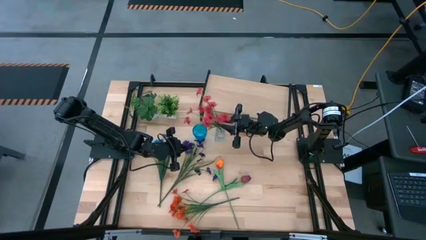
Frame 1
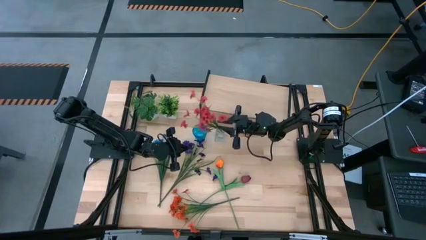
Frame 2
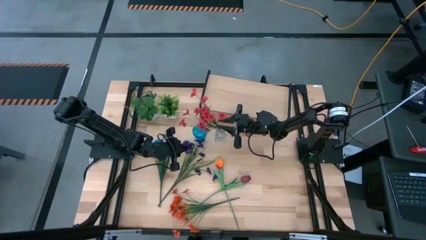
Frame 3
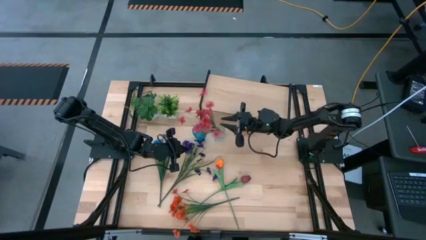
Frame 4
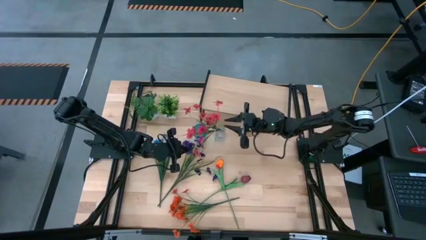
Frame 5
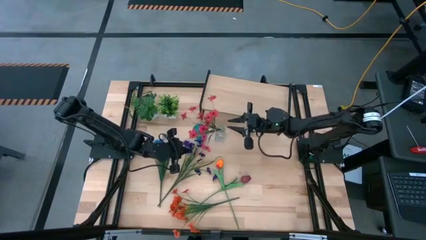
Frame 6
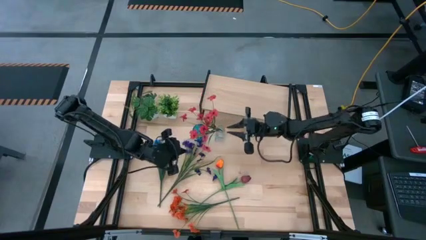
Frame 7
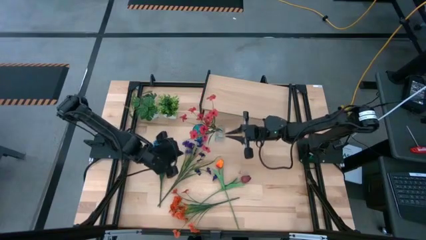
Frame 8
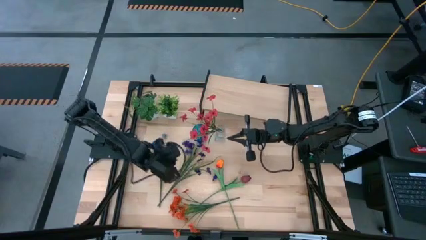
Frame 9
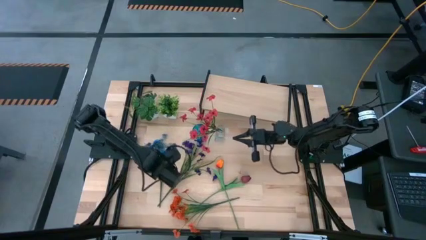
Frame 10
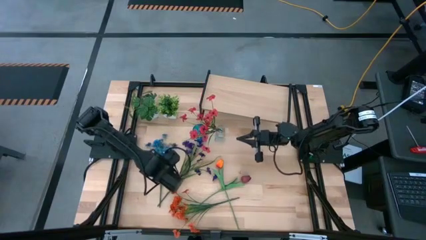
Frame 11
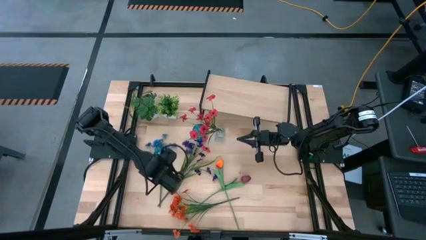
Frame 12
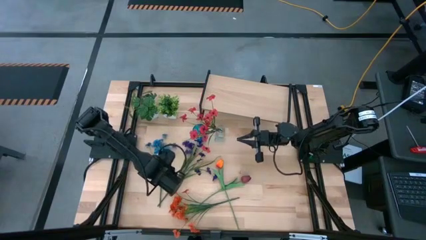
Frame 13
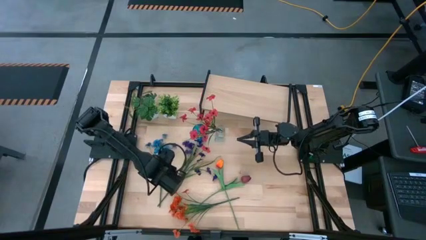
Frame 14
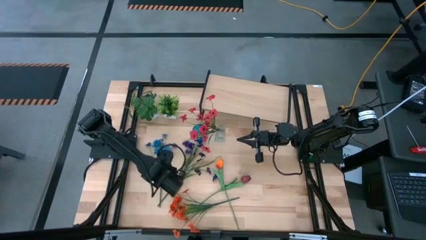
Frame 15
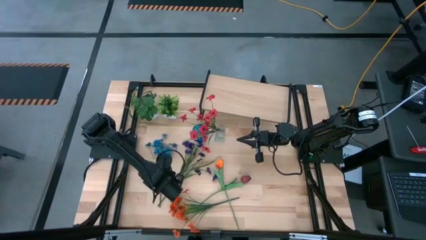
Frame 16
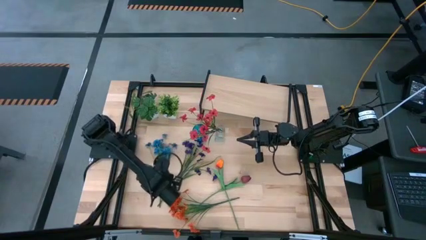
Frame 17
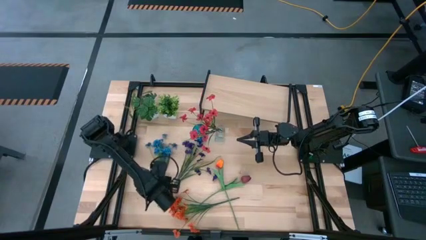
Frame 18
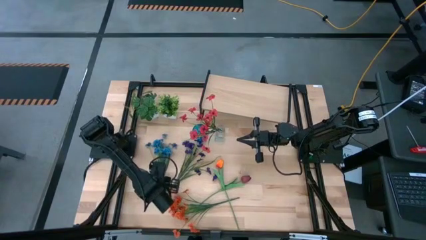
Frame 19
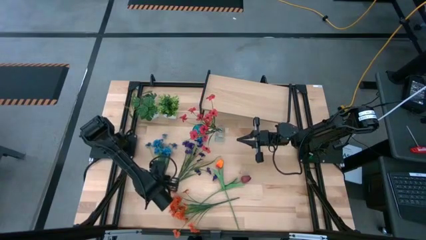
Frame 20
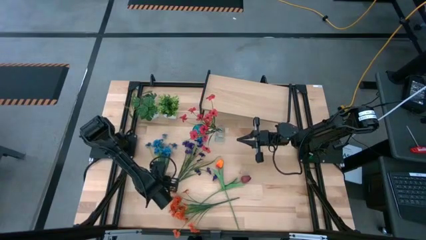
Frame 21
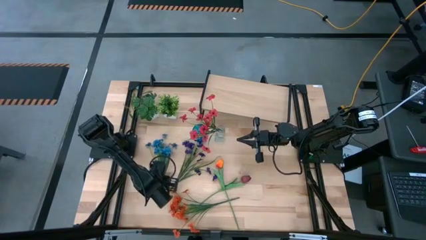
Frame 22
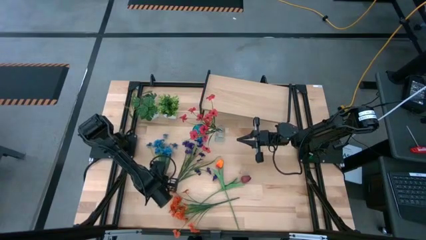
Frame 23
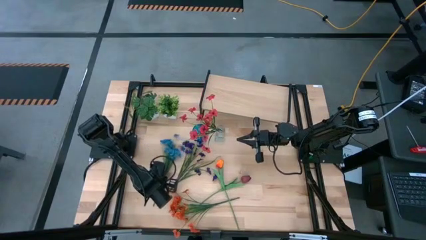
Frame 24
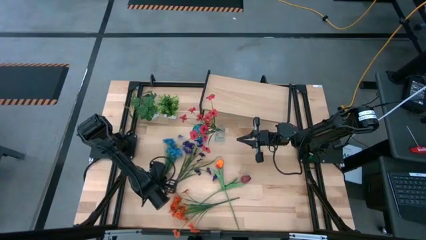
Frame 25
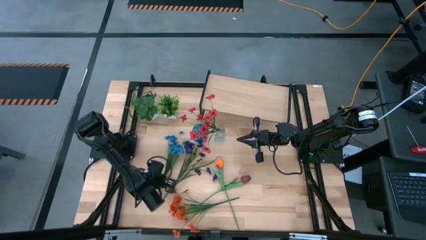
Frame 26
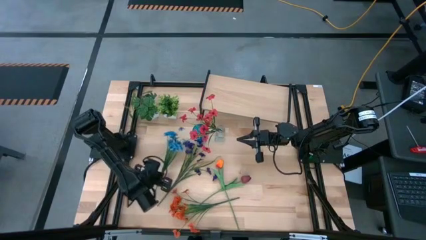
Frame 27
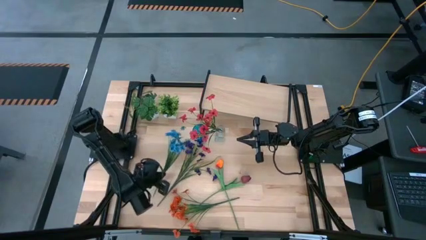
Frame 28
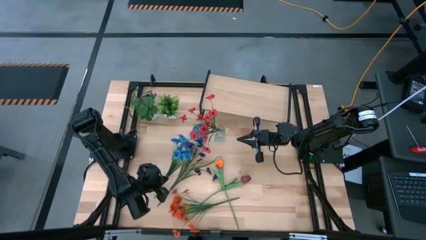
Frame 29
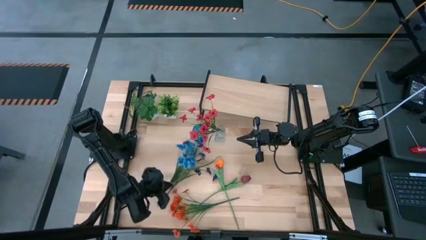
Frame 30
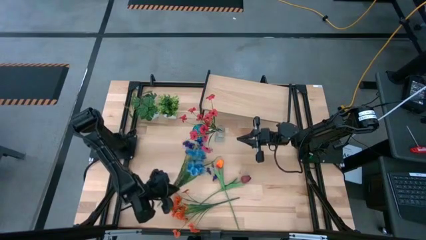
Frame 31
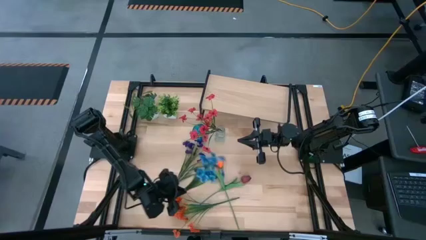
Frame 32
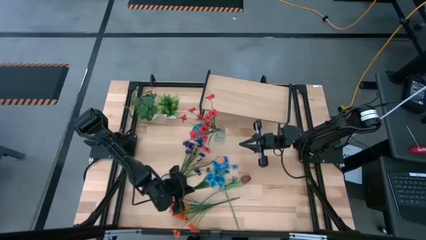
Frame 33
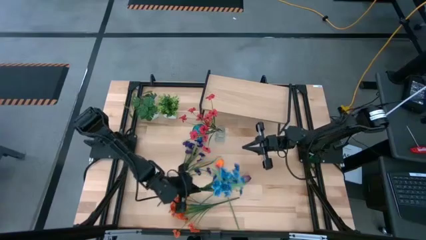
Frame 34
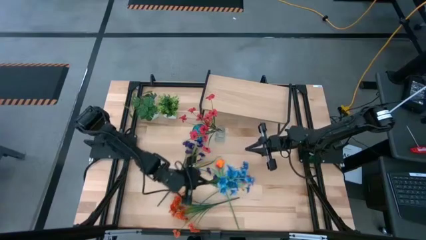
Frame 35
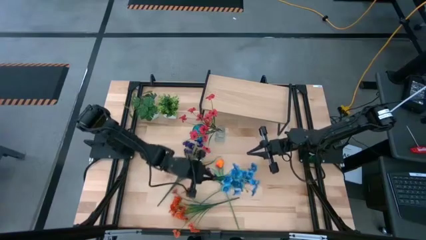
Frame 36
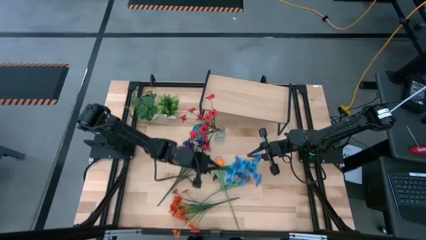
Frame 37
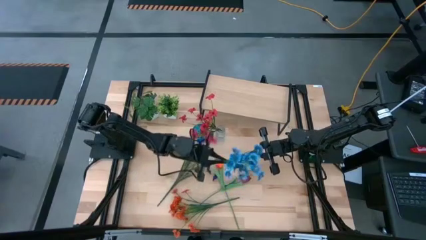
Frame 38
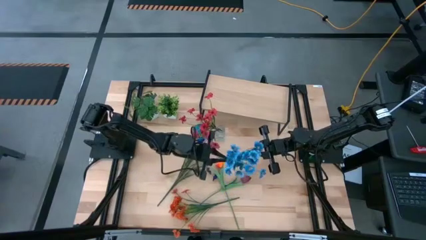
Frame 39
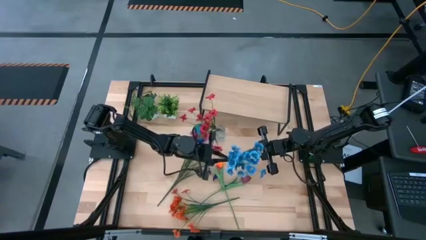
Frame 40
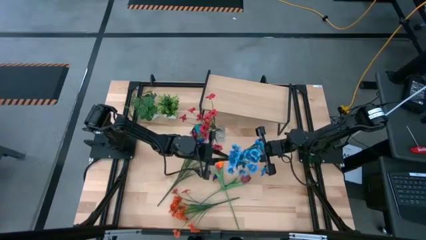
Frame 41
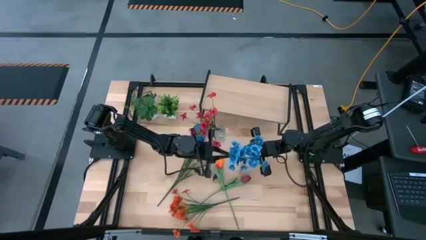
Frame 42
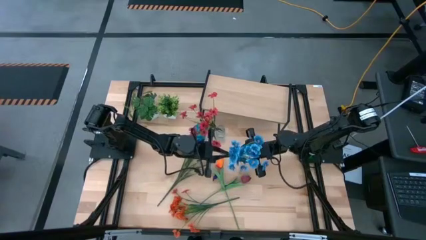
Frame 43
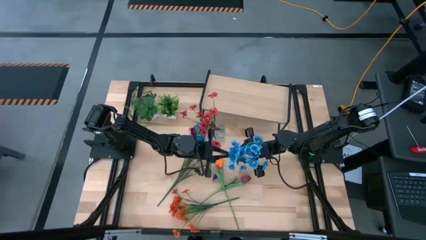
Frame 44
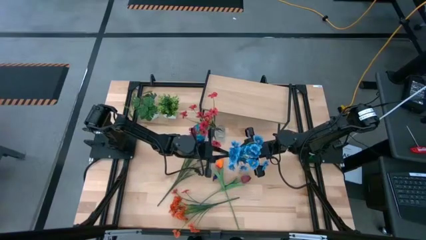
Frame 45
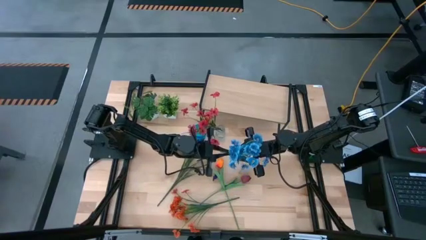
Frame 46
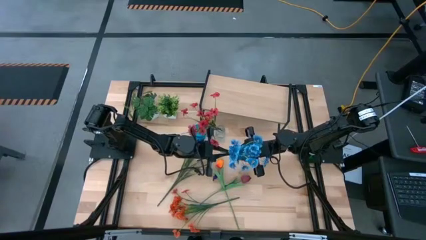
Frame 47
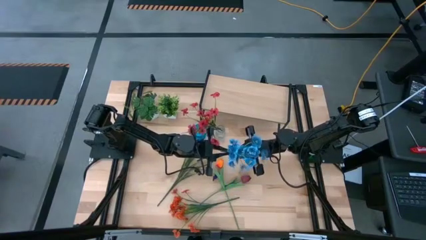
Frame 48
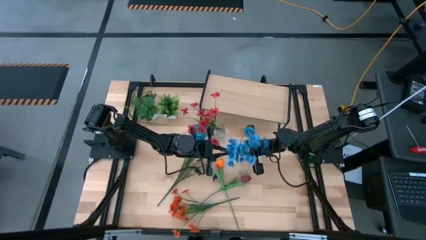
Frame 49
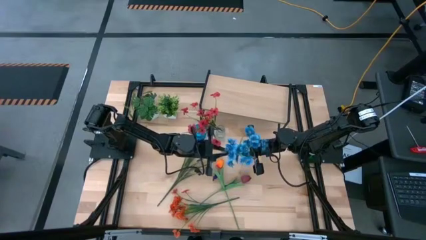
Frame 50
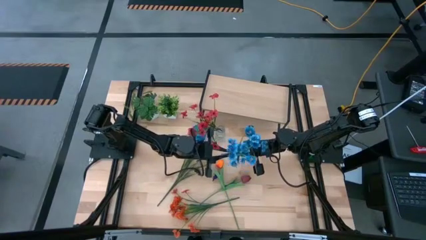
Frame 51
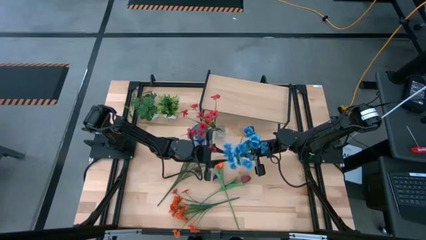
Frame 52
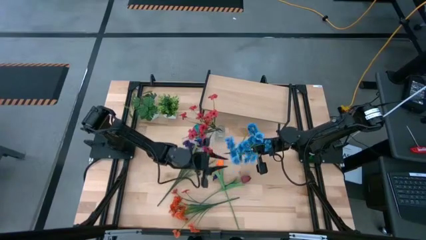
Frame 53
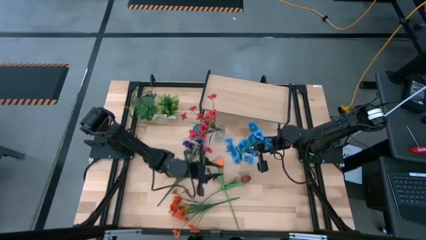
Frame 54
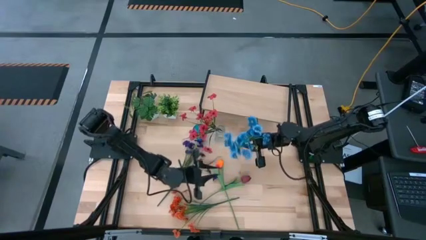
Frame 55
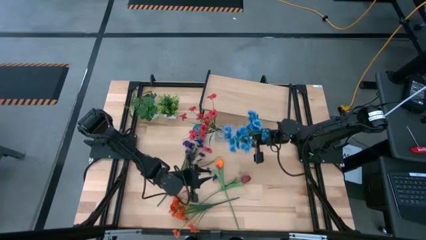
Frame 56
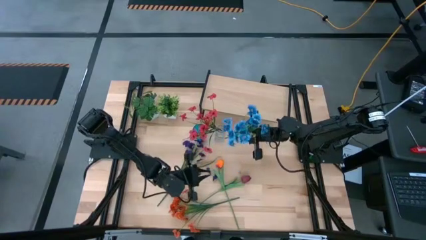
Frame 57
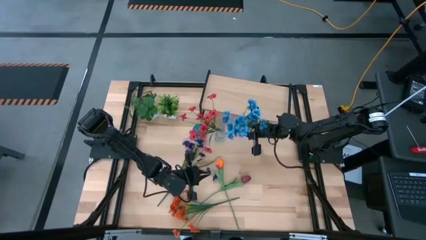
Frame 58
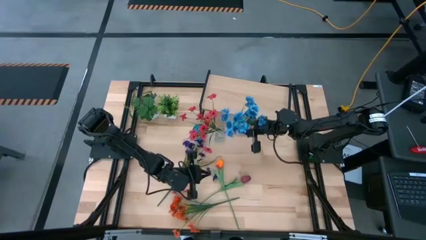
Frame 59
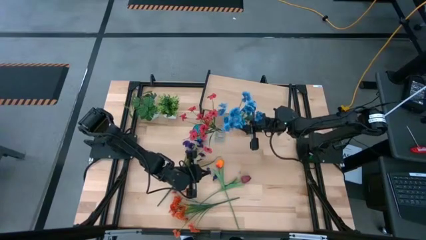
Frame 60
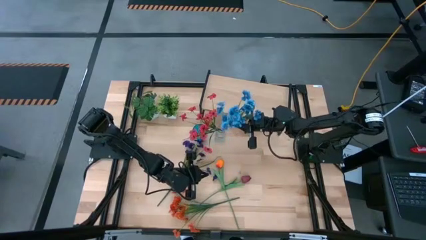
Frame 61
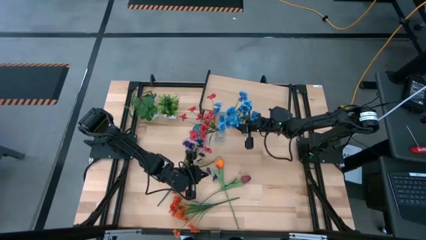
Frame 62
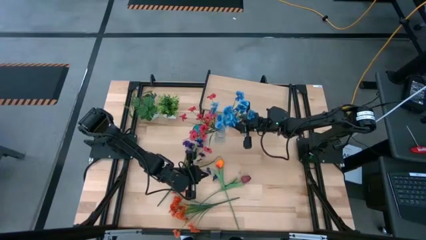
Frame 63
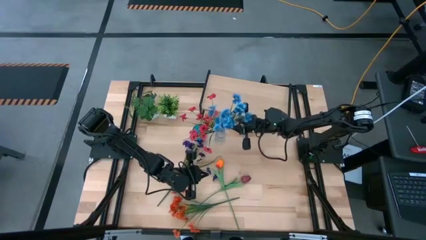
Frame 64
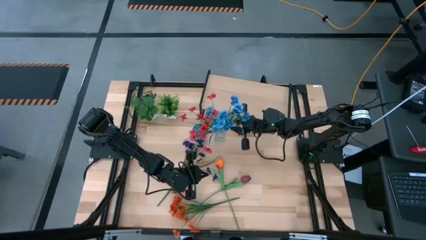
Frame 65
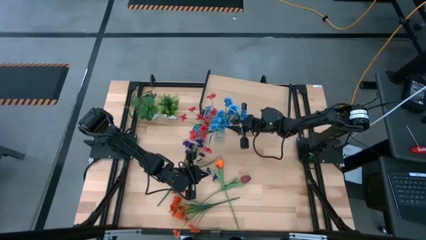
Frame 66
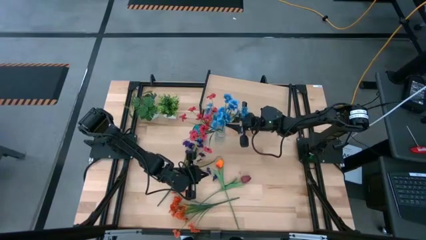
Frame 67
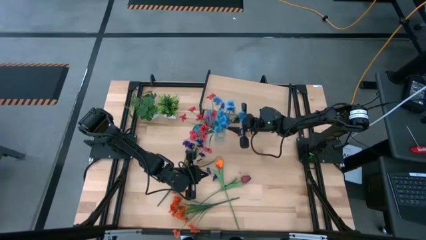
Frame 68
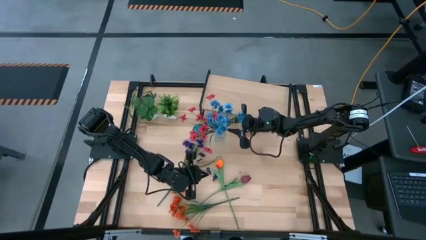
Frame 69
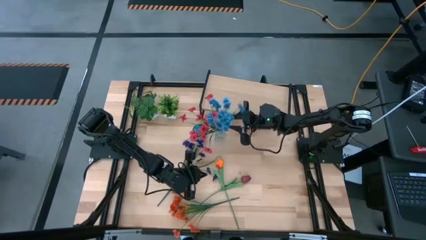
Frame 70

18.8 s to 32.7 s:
Task: Pick and place flowers into a vace then onto a shelf
Put the blue flowers into the transparent vase
